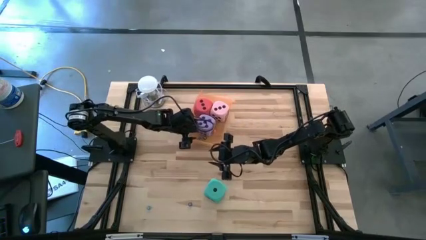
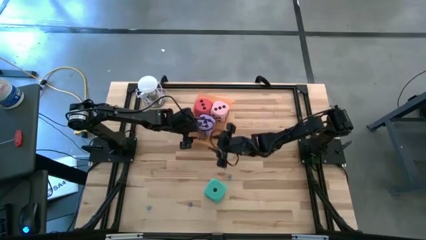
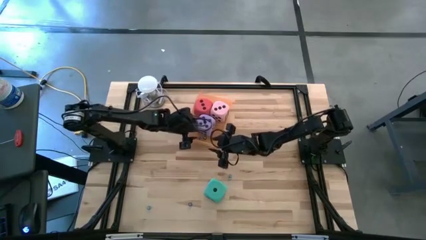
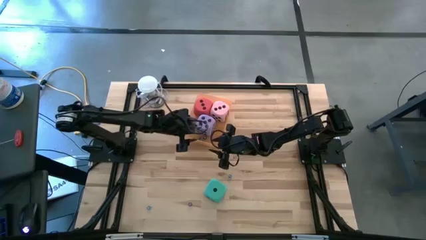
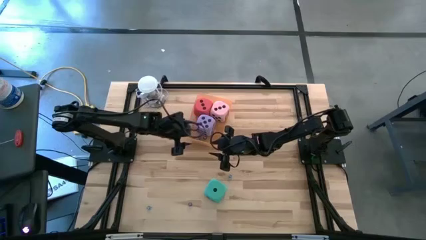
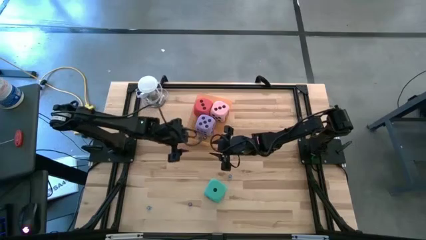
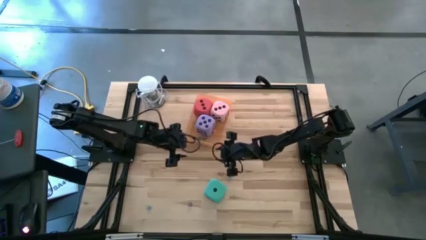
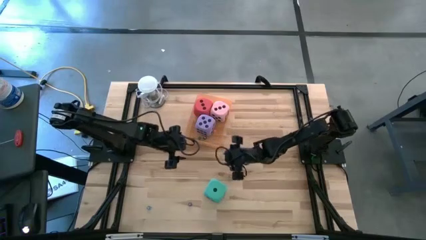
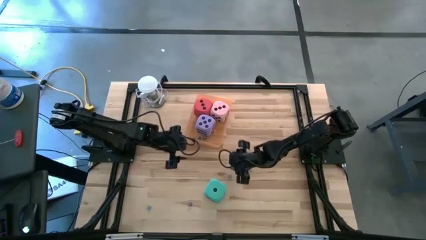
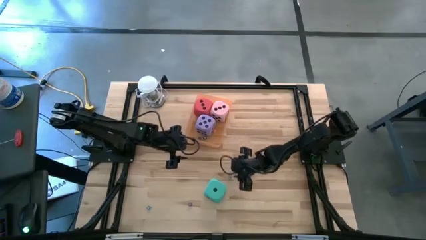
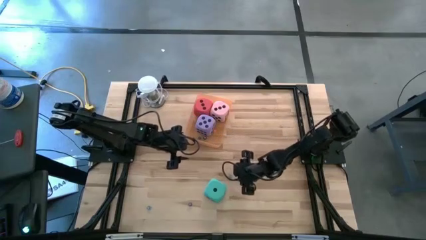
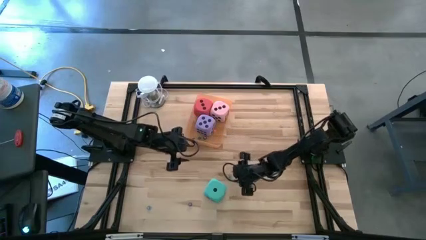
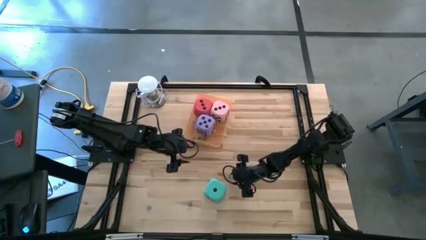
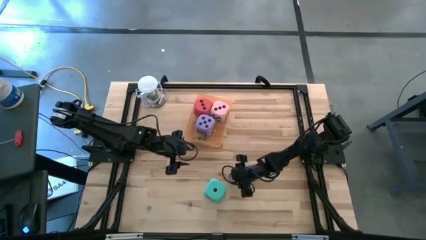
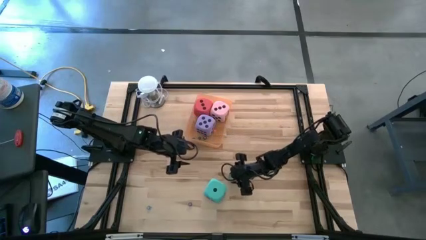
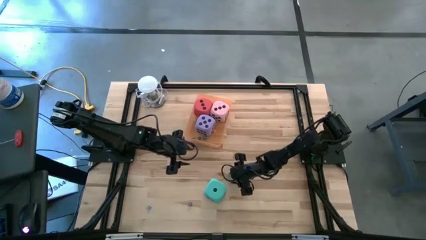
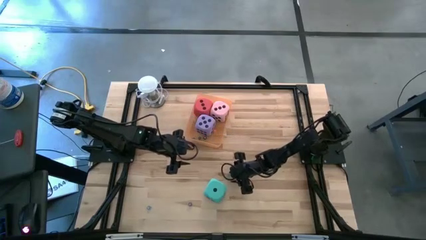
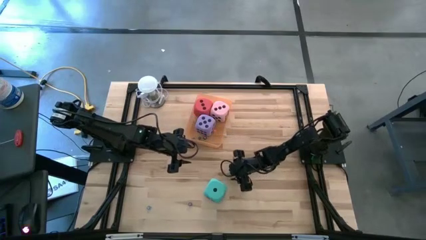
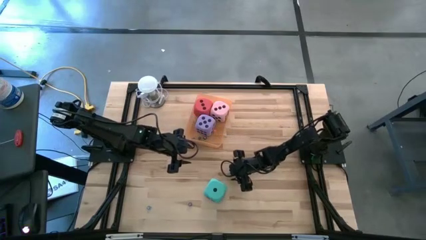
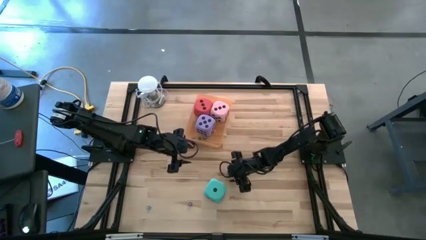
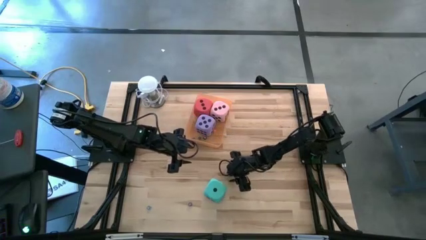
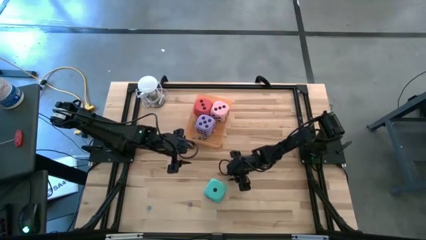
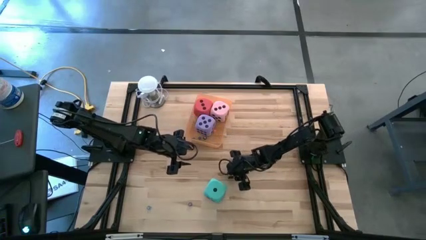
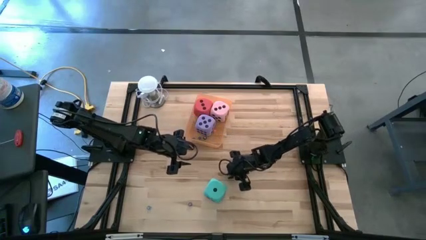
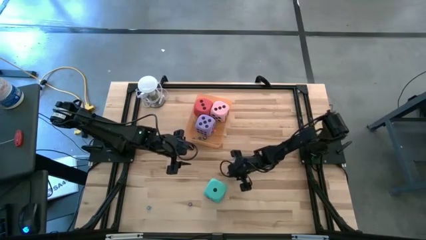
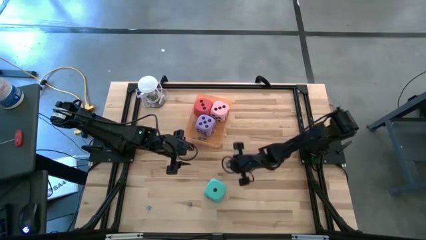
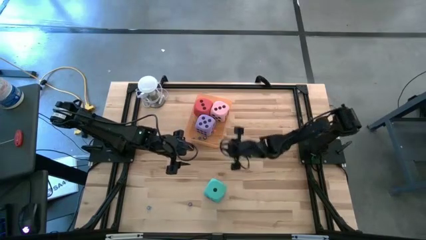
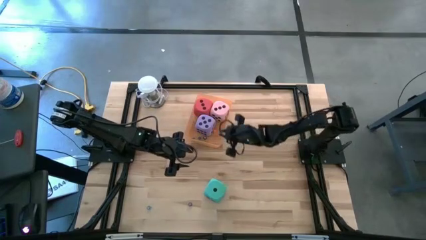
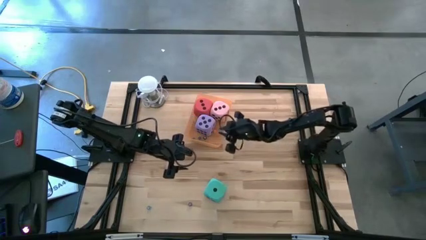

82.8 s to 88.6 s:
Task: Pick & Place Dice
Put the small blue die into the orange bin

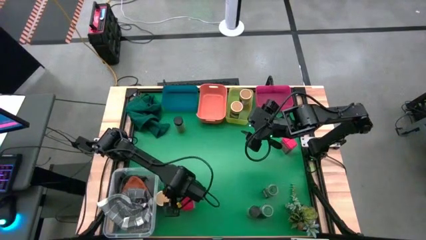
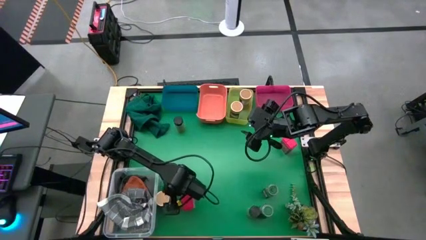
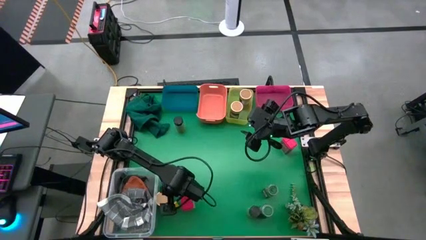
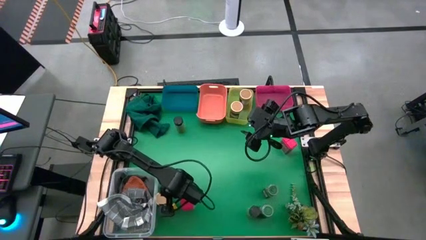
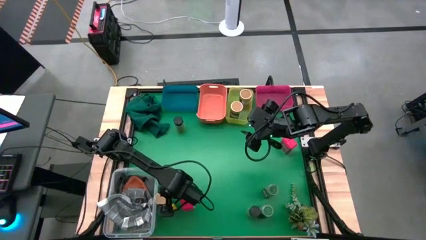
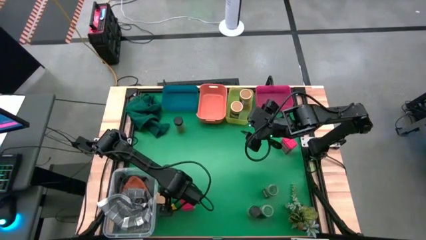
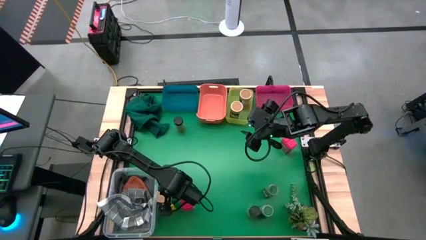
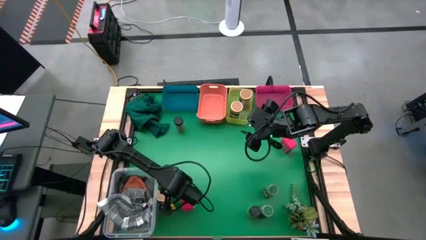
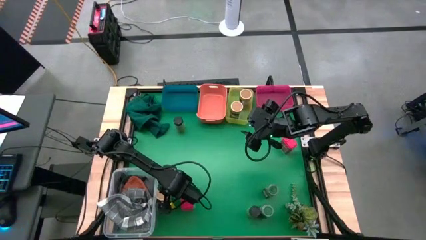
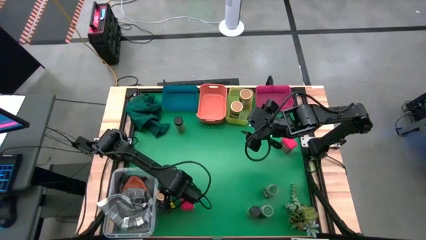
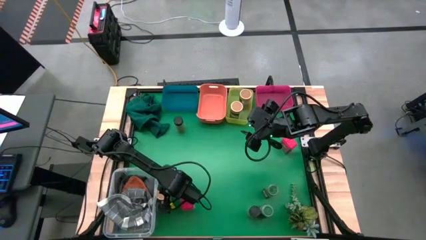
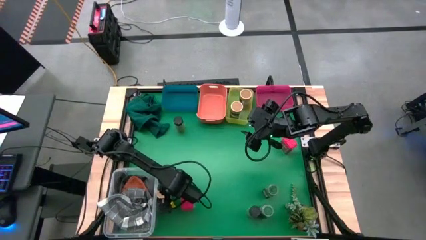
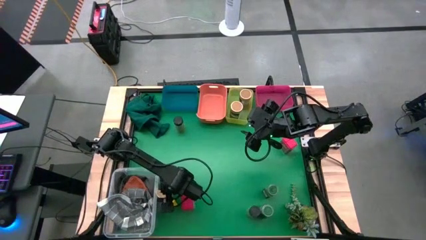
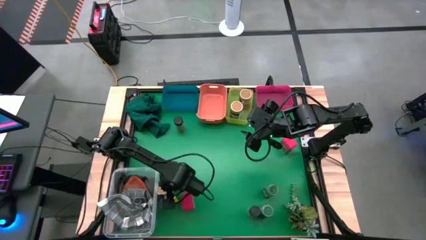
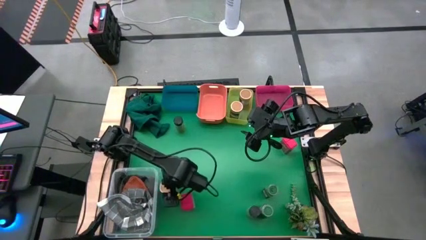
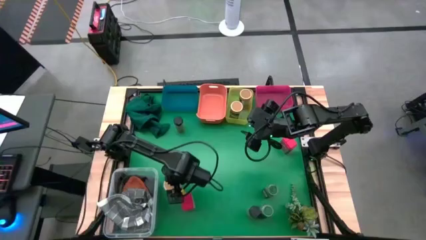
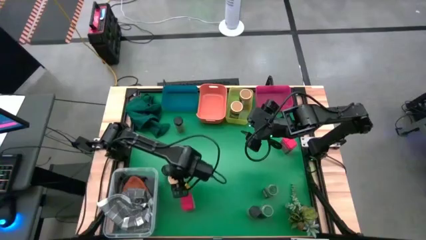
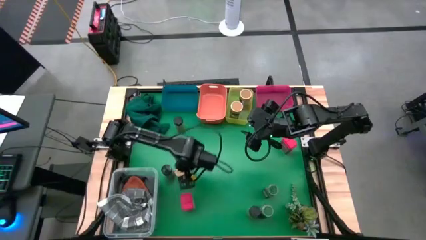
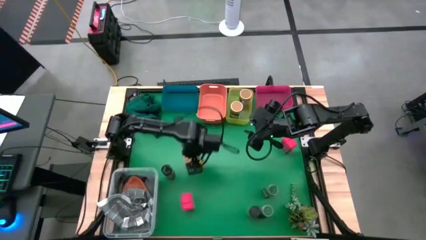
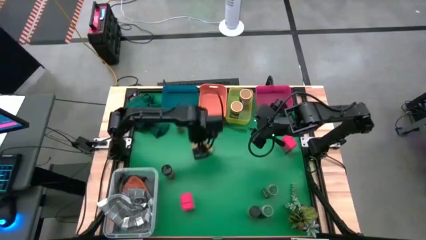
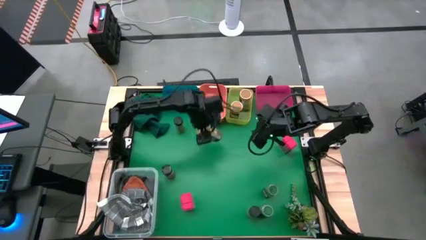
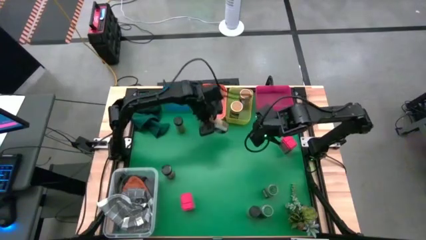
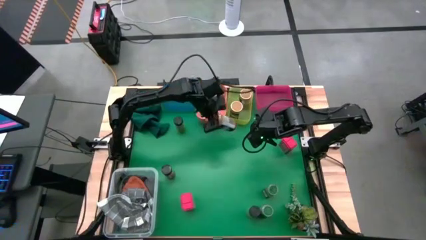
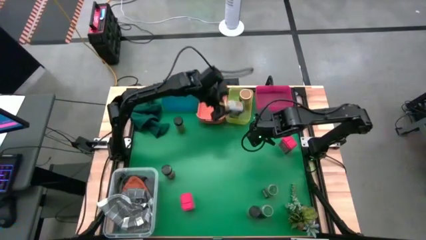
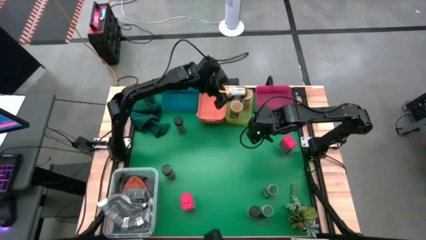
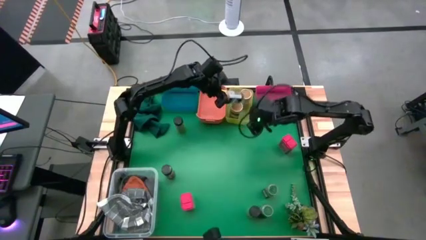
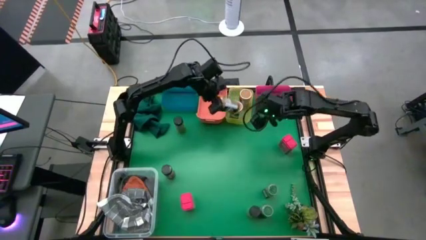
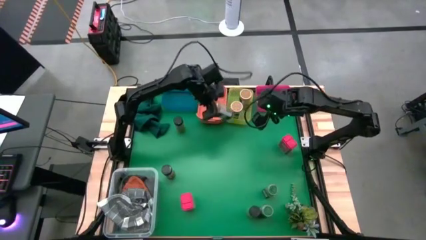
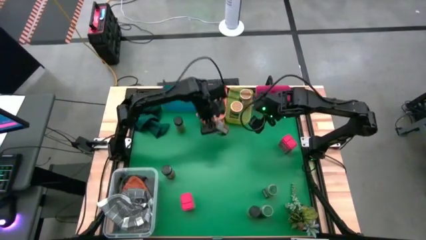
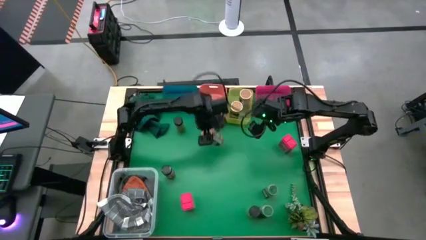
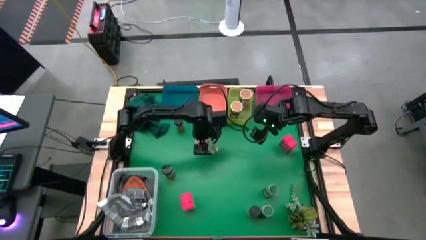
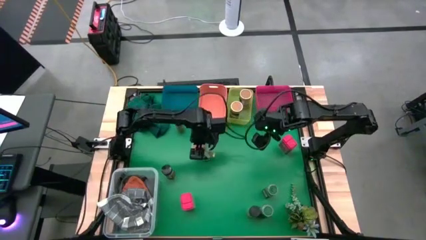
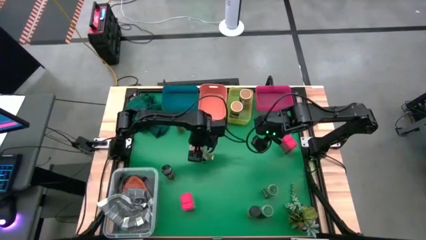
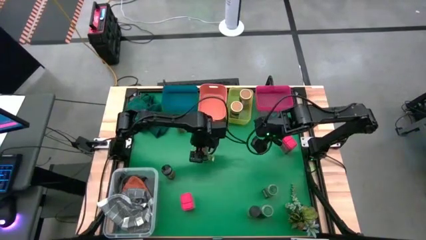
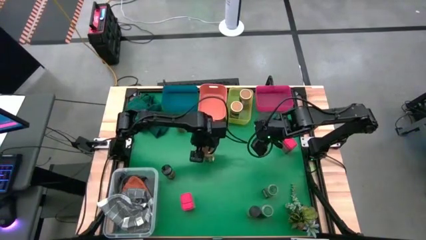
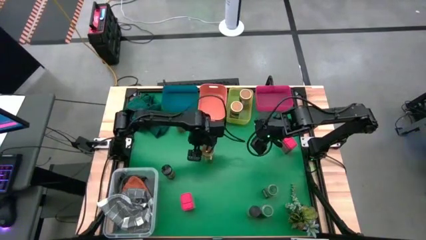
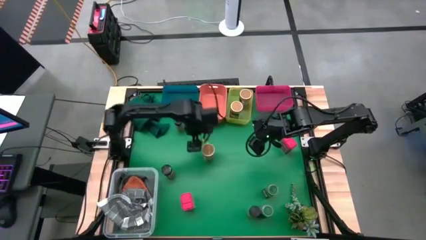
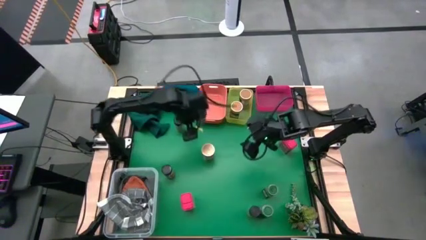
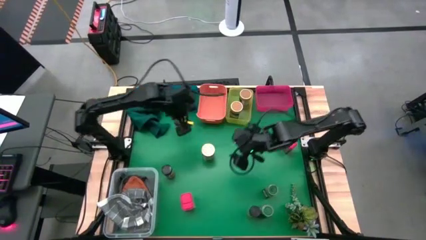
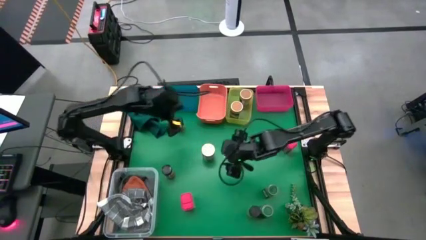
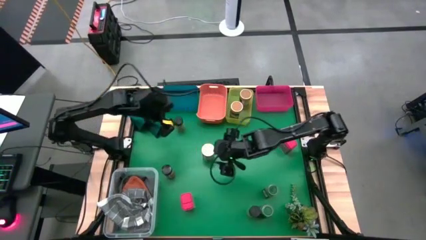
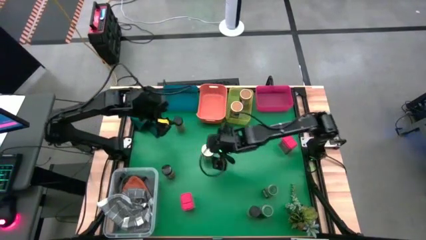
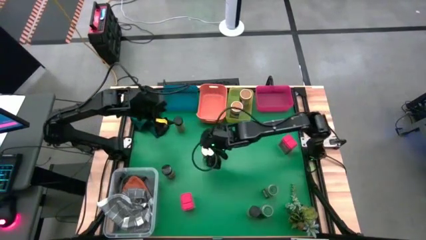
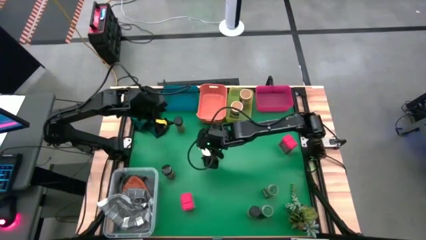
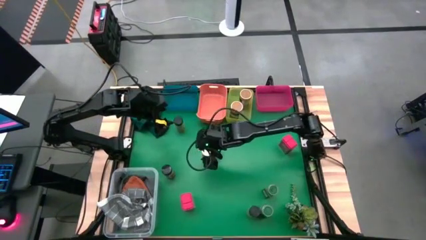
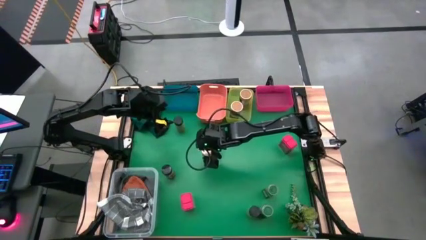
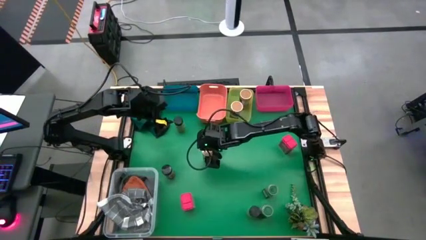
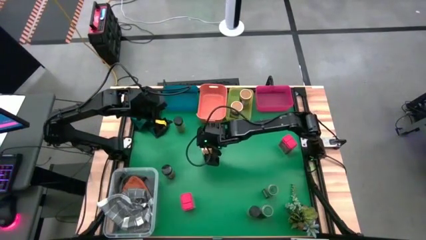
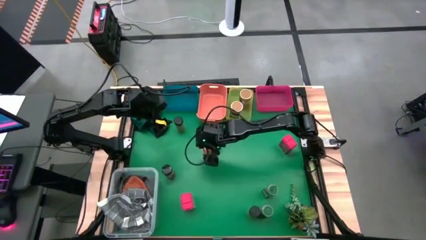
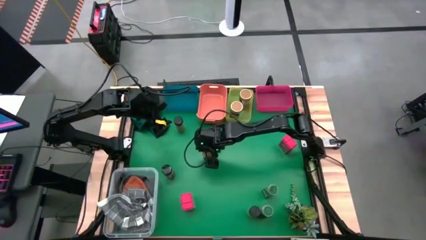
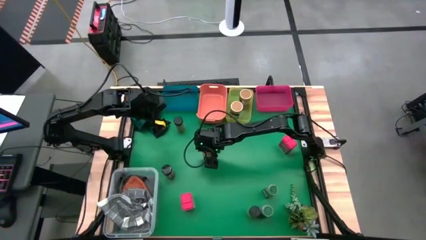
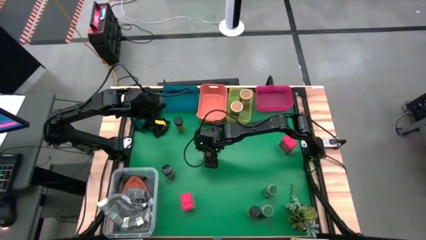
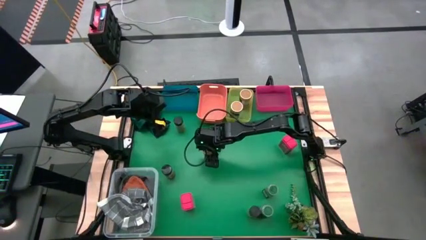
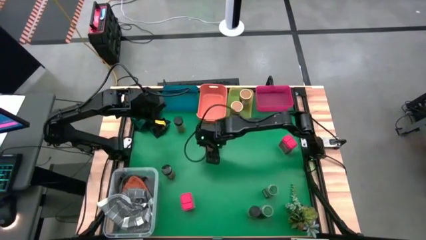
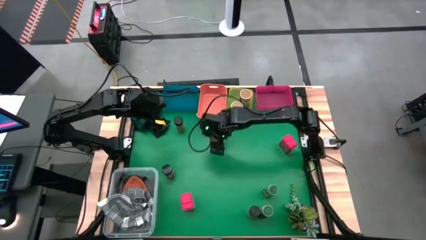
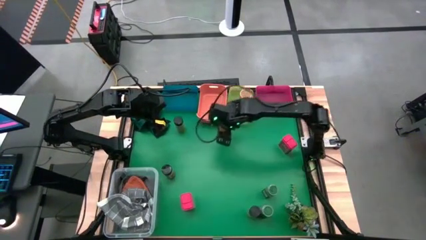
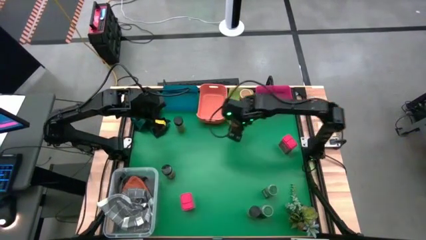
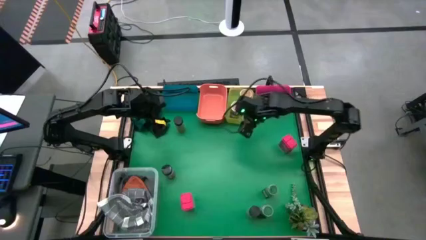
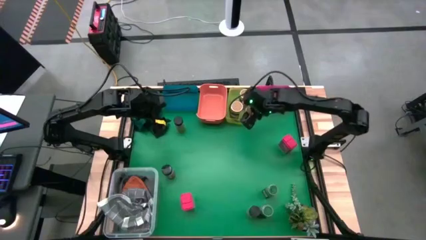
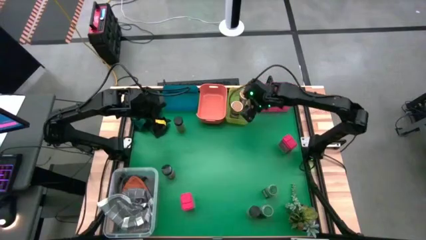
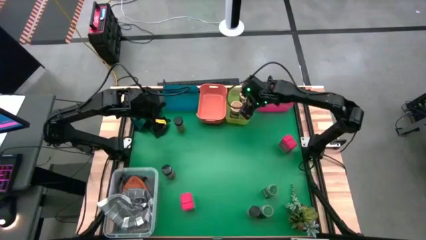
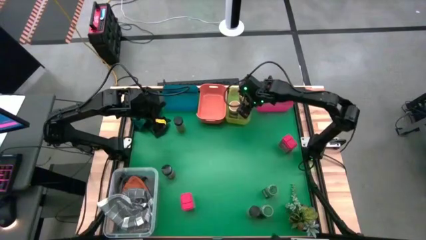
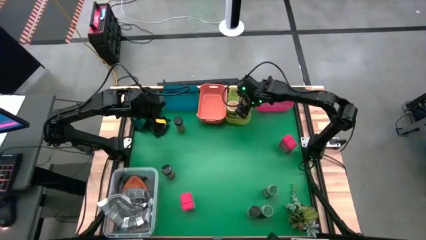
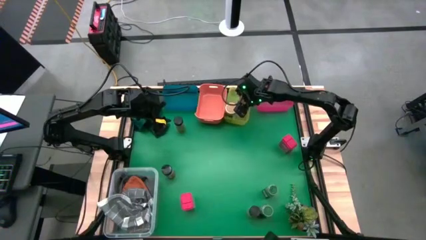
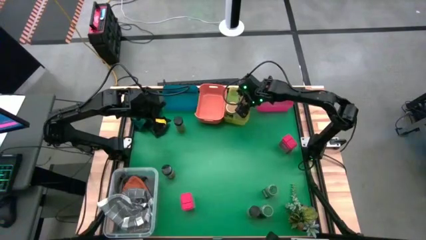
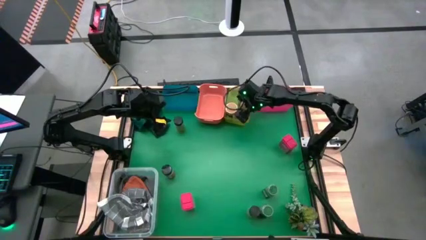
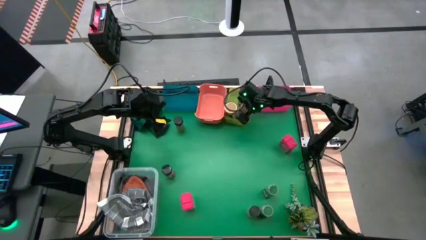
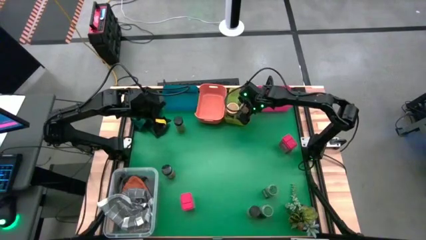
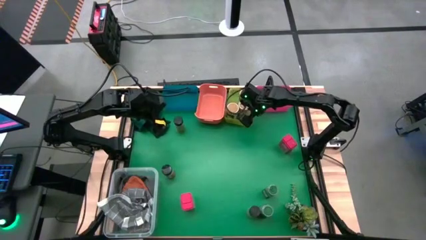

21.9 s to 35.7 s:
Task: Sort spices by type
Put the yellow seasoning bottle into the yellow bin
